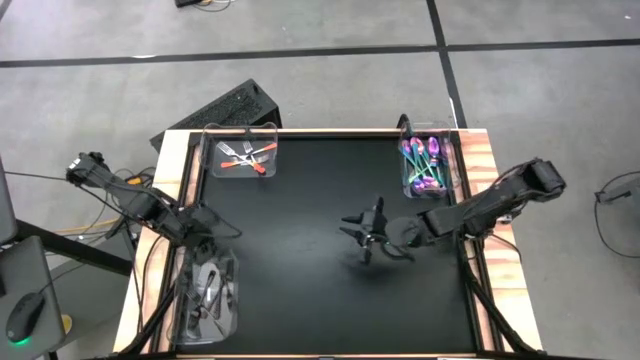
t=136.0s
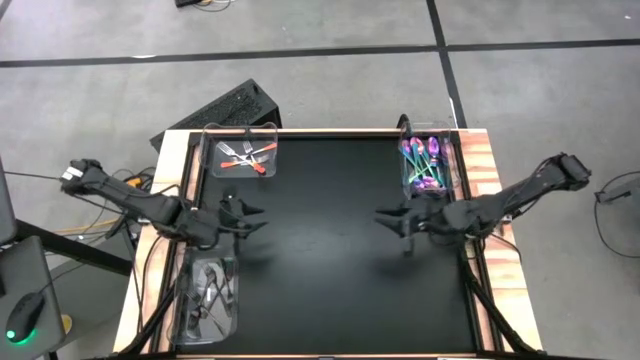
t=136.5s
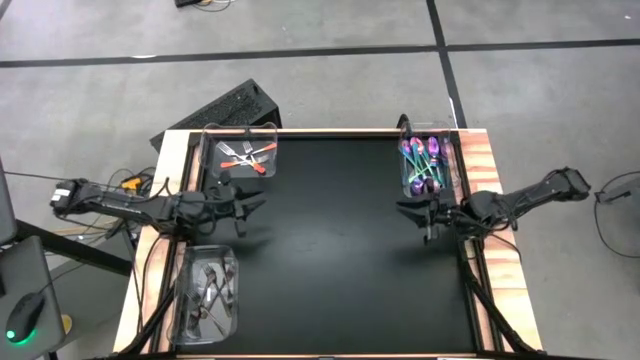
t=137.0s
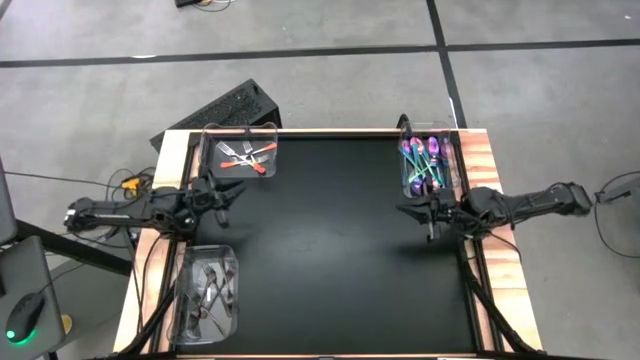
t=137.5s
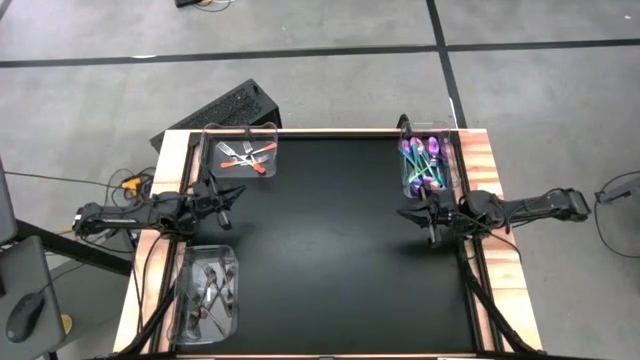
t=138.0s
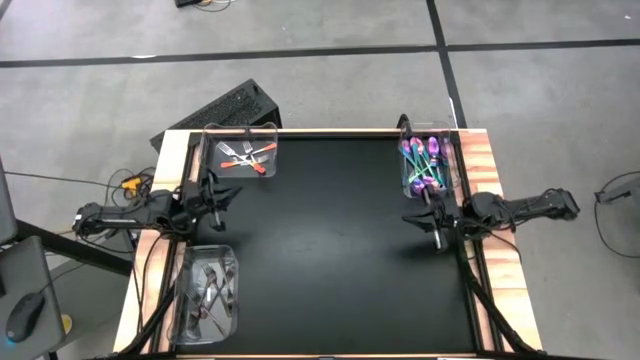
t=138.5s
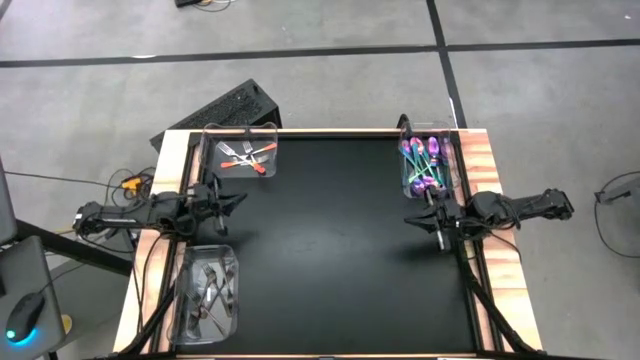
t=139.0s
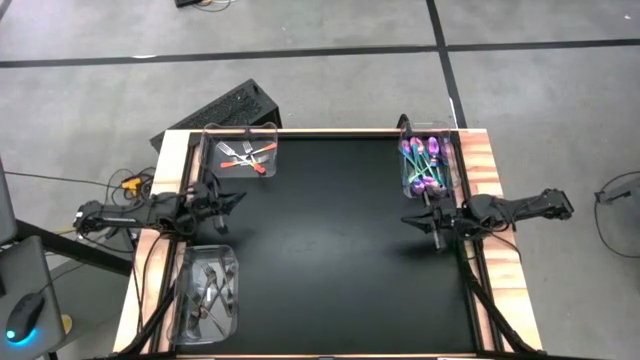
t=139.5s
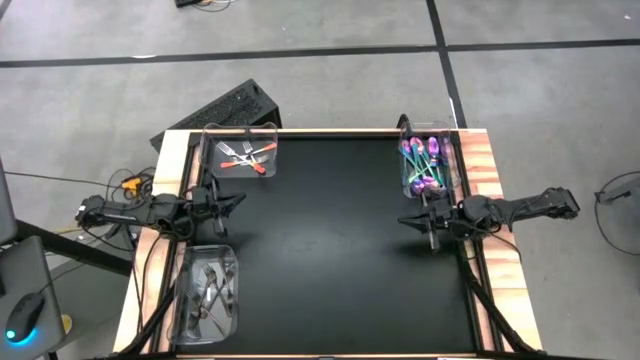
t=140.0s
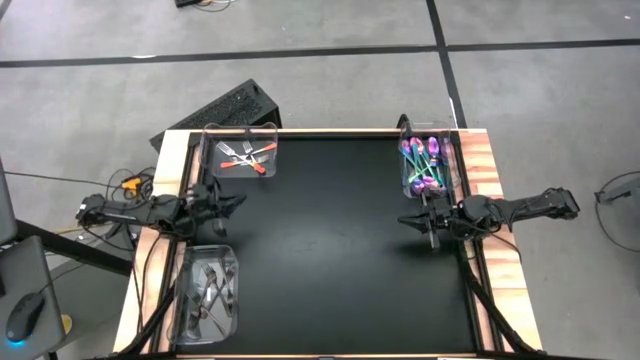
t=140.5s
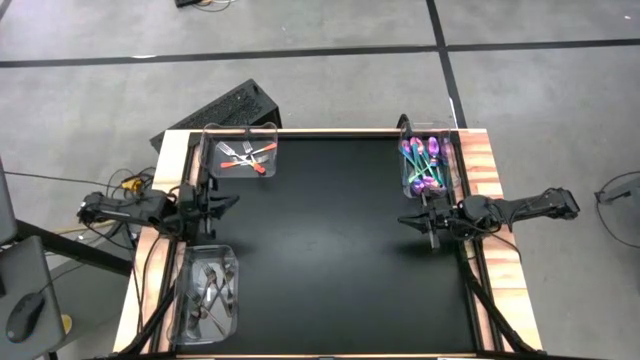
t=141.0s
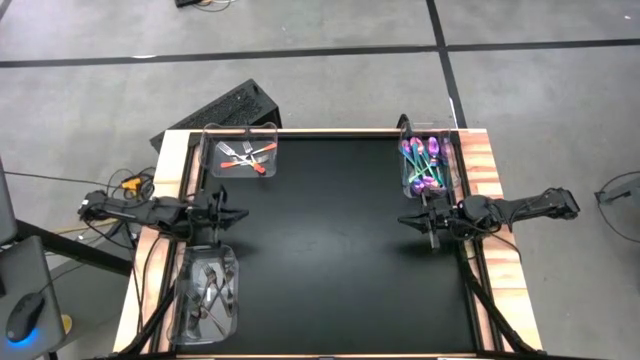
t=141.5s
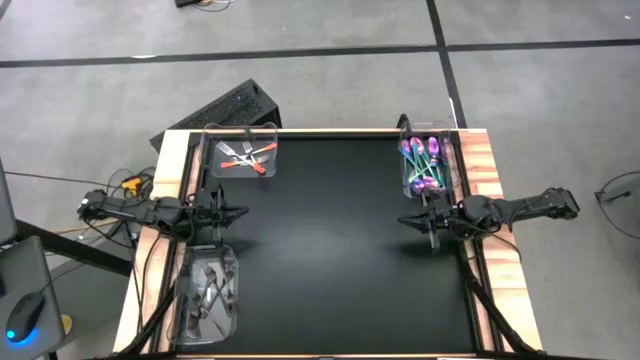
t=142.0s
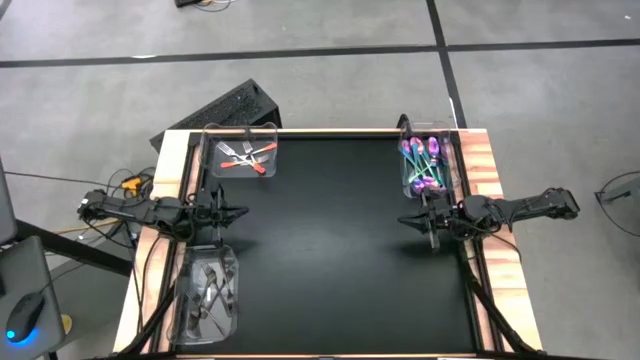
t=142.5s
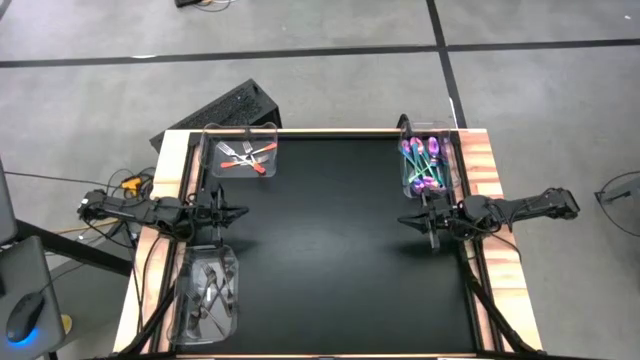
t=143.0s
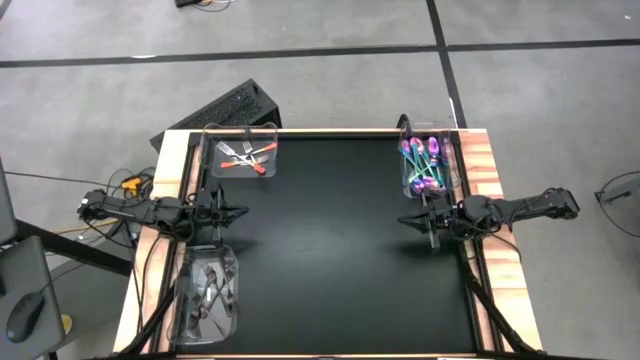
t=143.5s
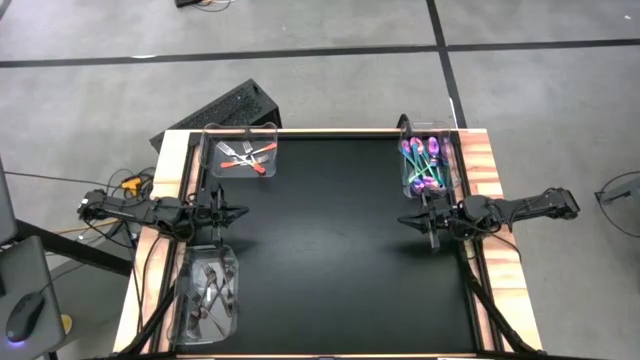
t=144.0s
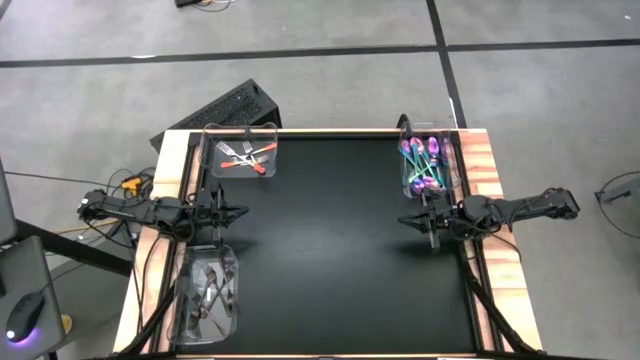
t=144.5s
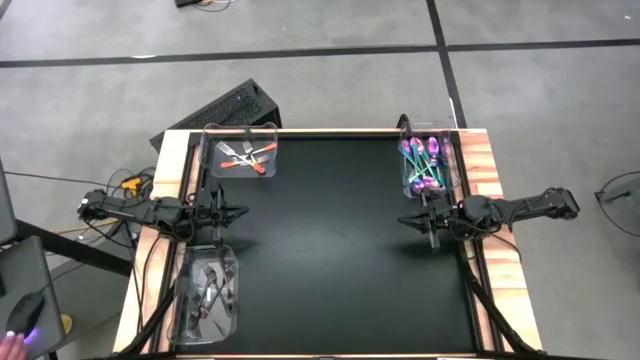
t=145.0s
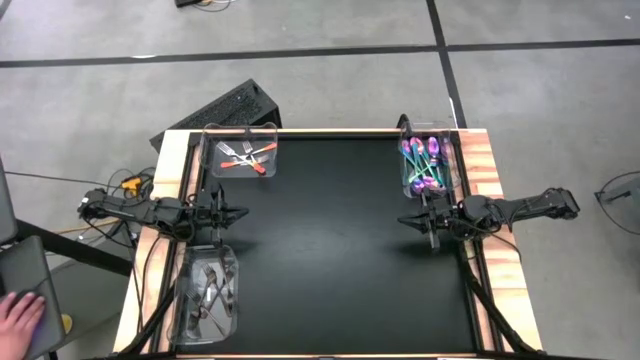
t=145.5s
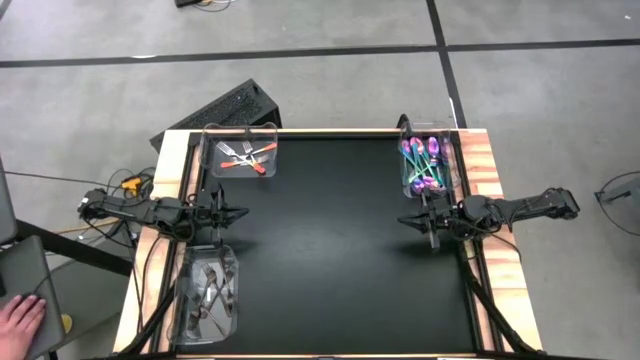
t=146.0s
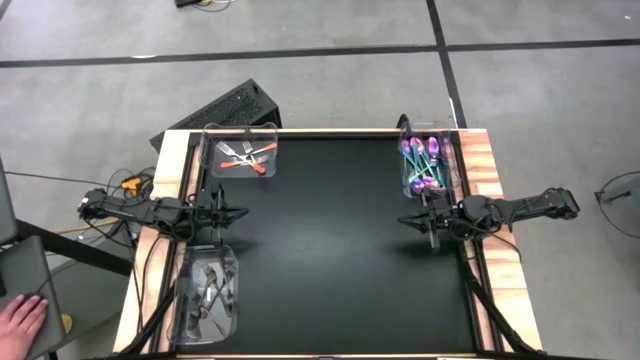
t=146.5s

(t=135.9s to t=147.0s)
Task: Sort silverware by color (type)
Return to Home Position

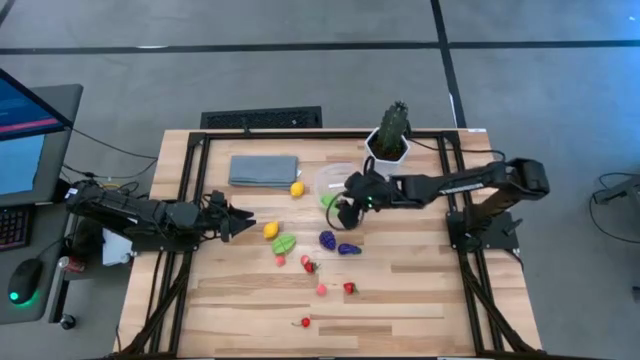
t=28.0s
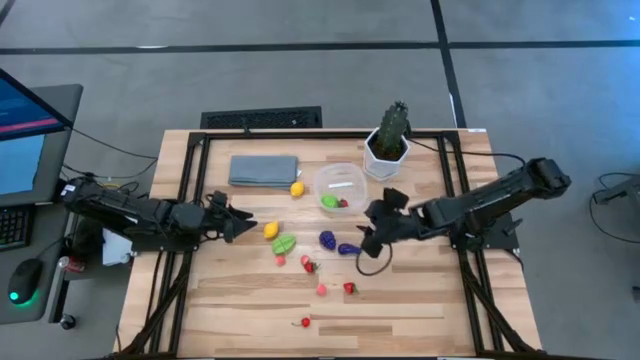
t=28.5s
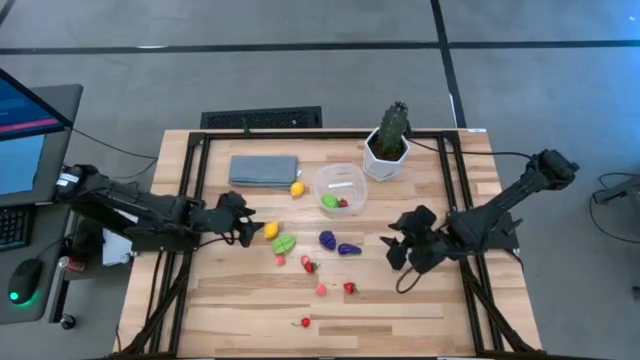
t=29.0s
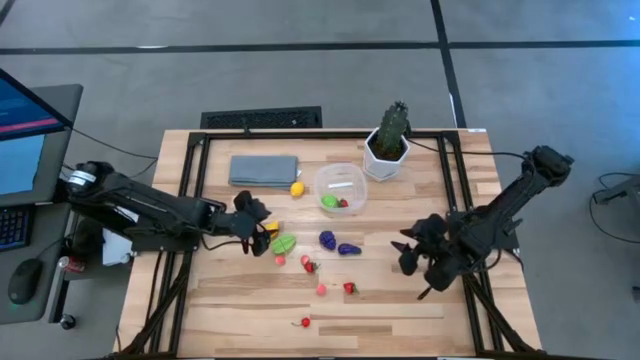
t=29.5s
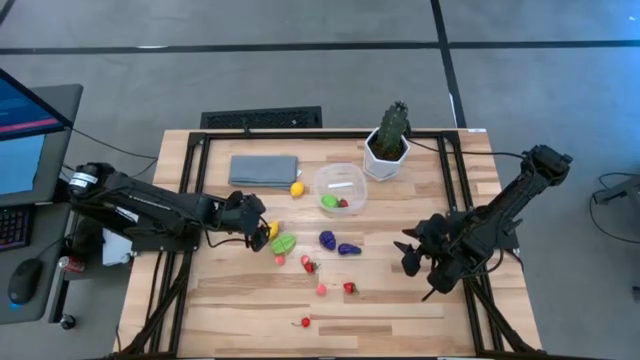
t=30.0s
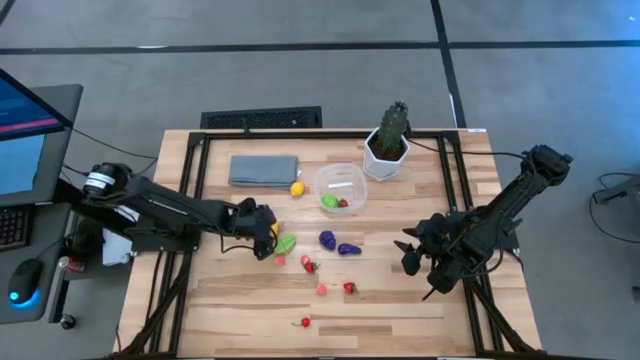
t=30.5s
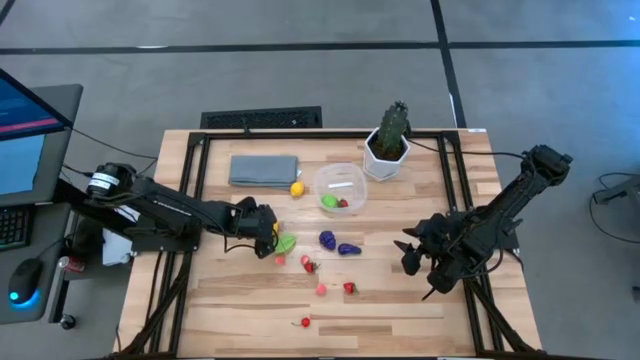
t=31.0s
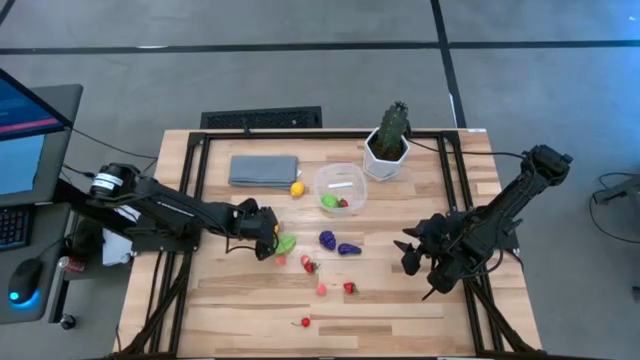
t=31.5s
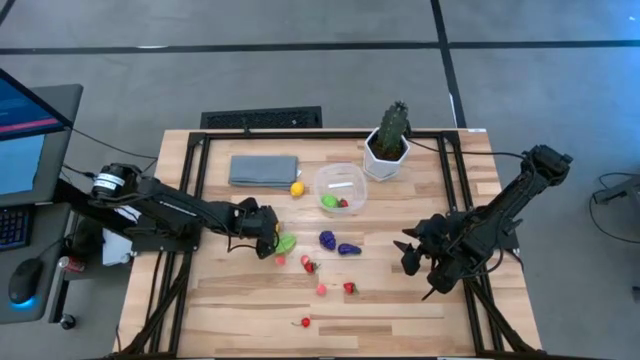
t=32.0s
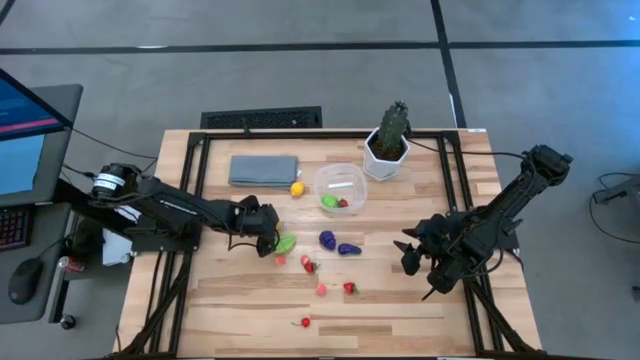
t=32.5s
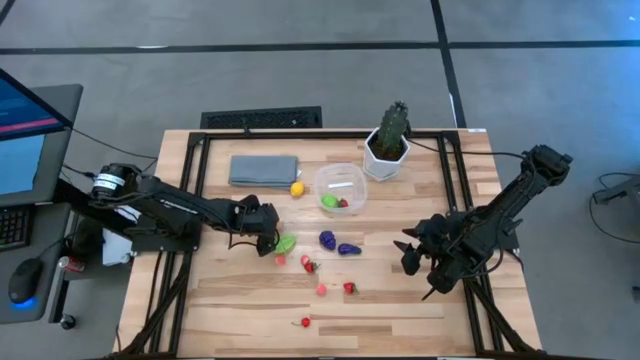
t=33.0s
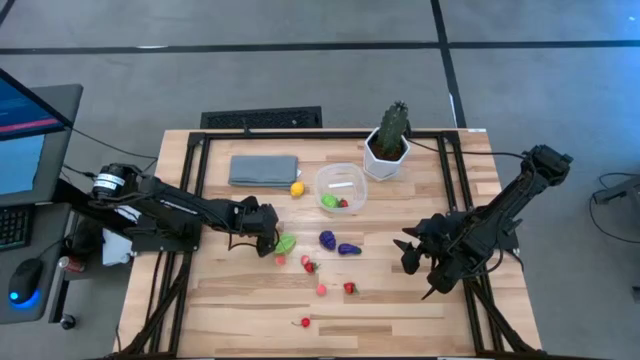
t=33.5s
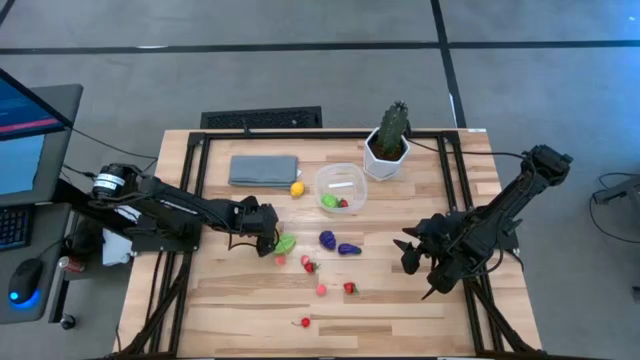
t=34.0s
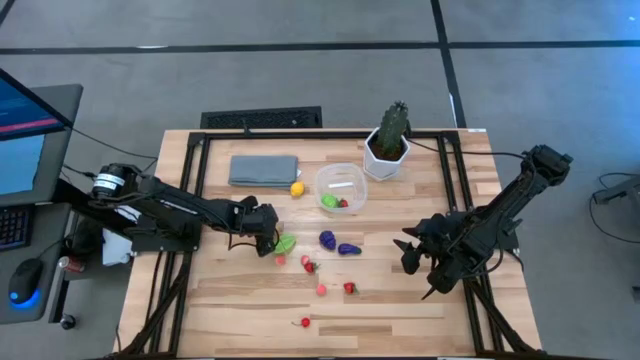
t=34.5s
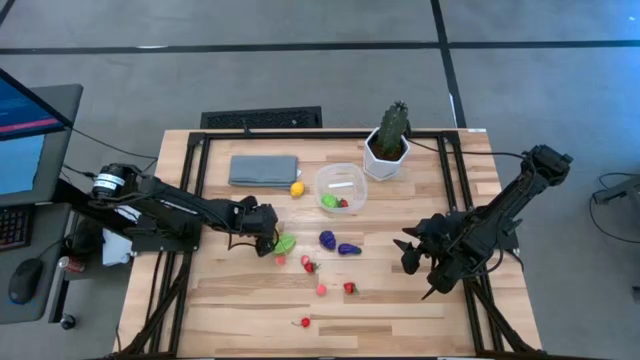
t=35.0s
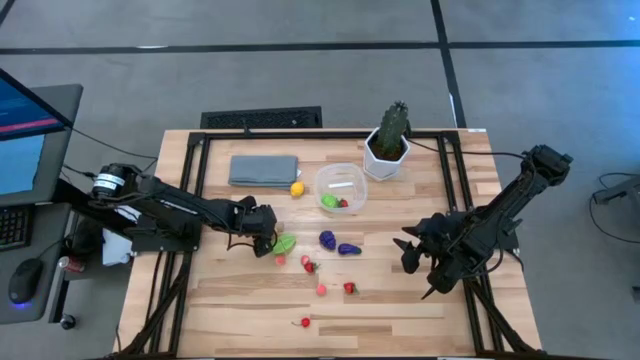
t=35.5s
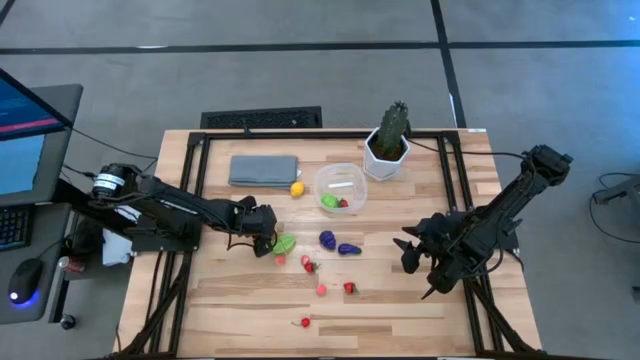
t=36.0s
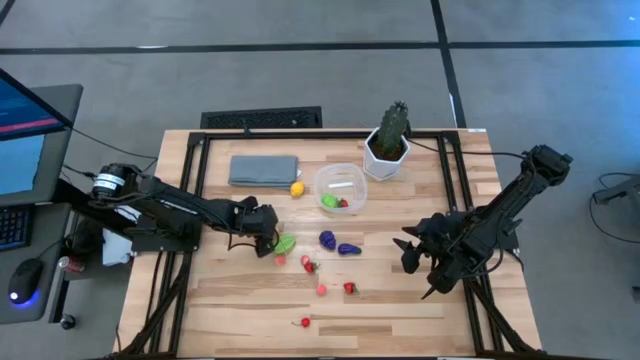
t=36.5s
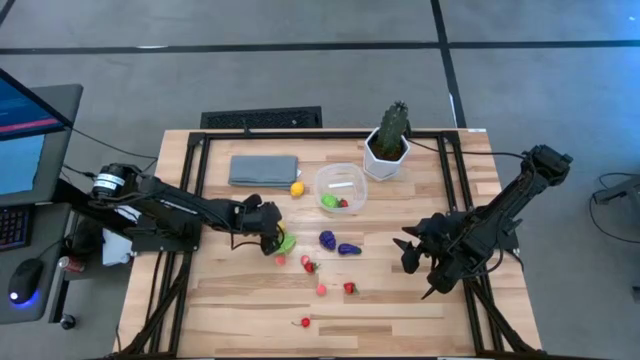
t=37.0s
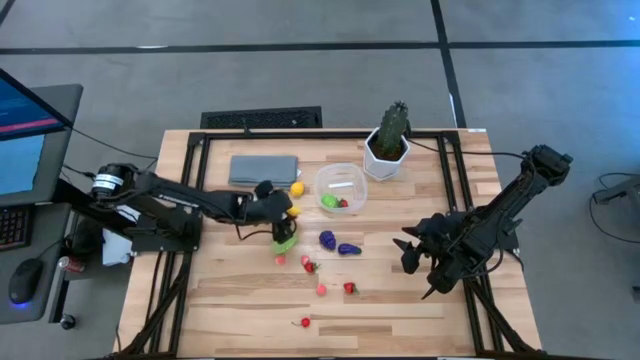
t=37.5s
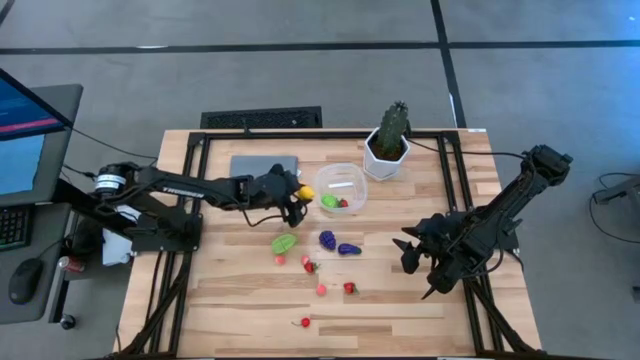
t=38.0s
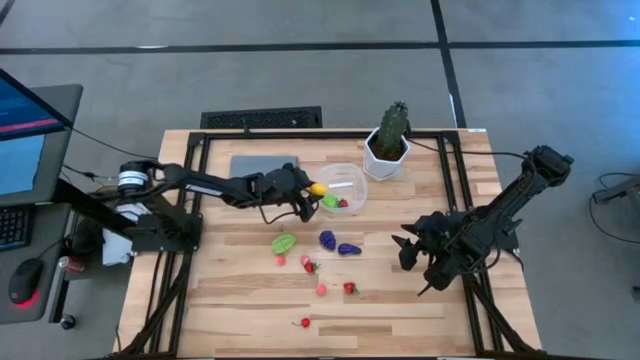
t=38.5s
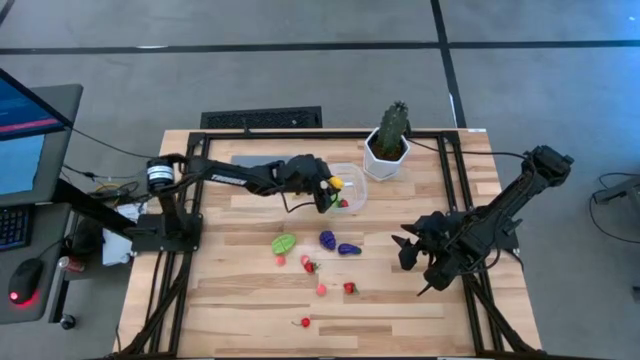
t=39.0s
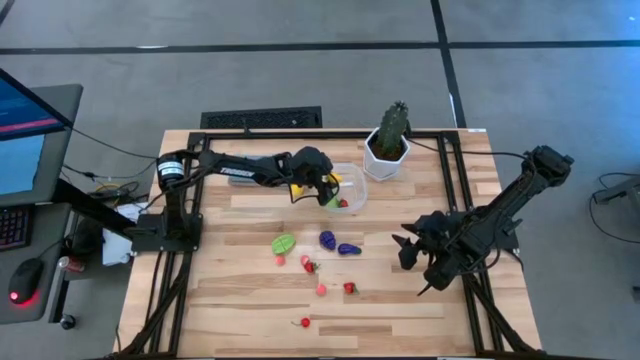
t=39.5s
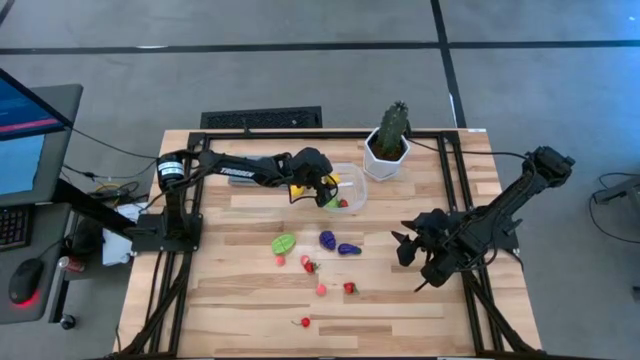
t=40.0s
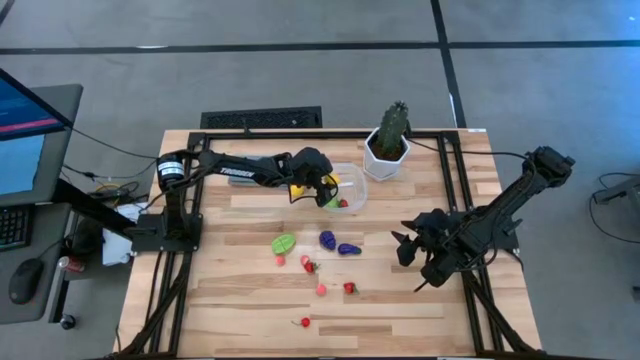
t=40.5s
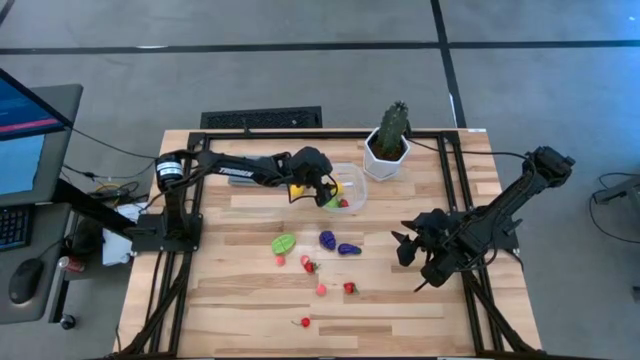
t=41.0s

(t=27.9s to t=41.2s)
Task: Pick and placing Produce into tupperware
Put the bottom lemon into the transparent bin
